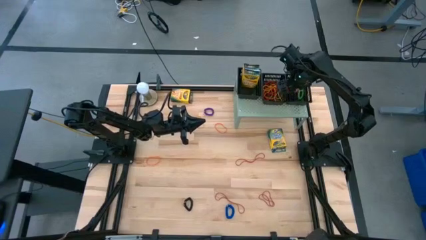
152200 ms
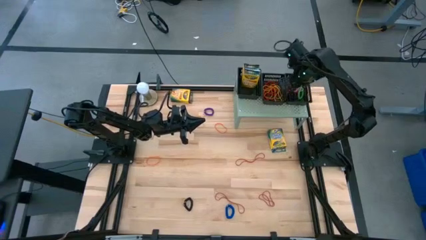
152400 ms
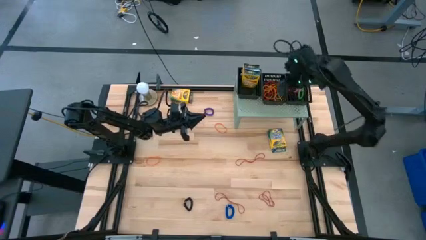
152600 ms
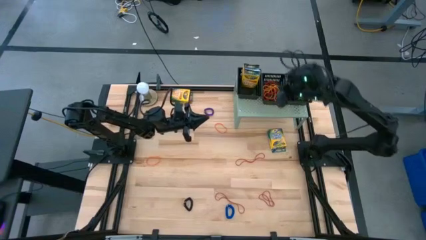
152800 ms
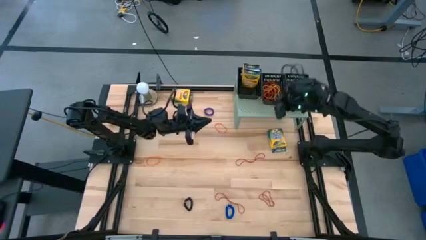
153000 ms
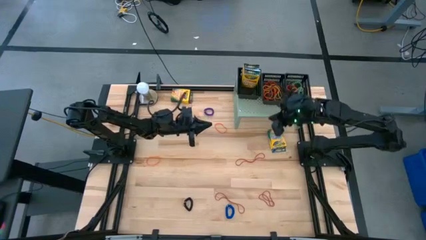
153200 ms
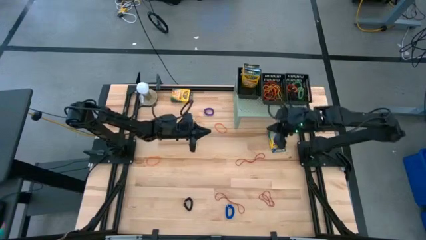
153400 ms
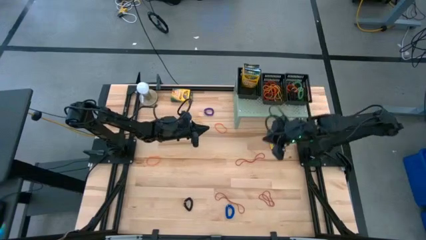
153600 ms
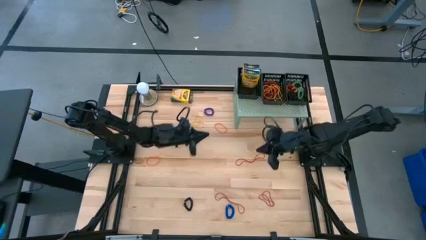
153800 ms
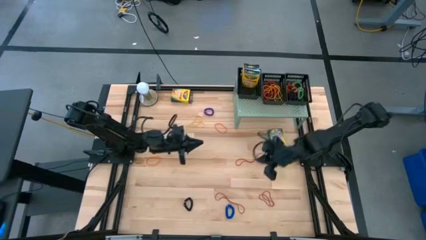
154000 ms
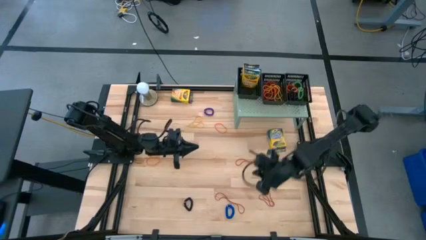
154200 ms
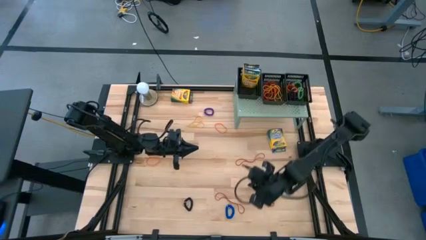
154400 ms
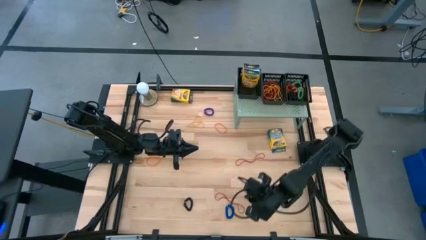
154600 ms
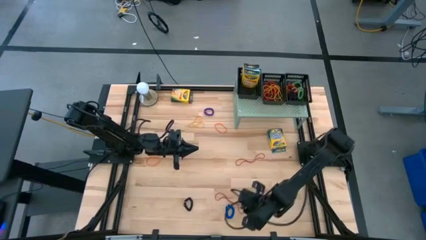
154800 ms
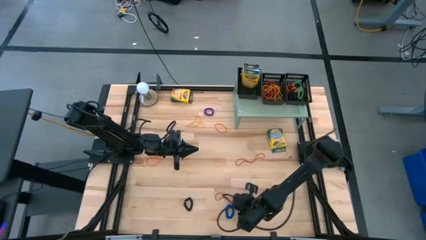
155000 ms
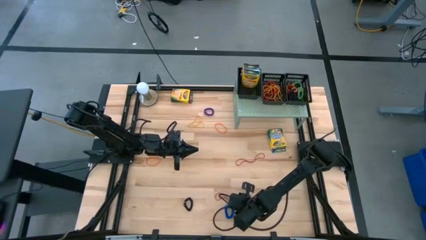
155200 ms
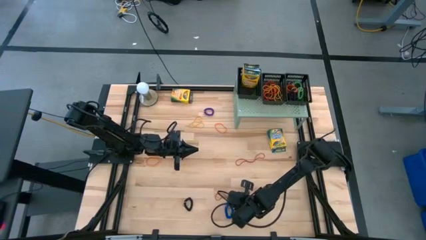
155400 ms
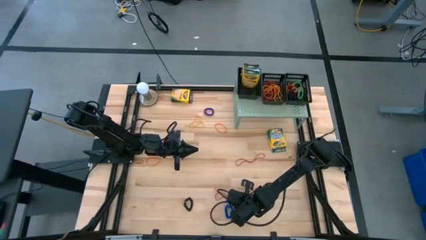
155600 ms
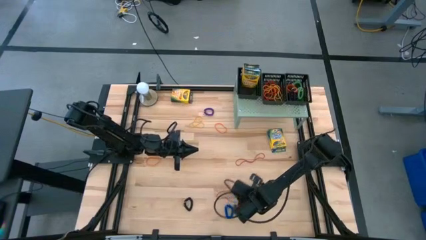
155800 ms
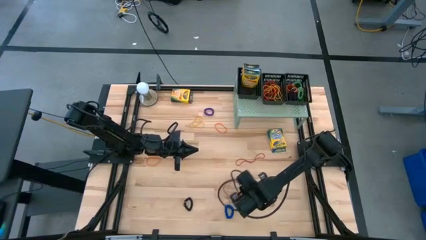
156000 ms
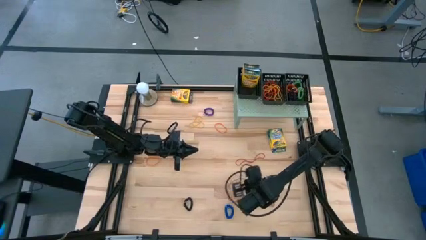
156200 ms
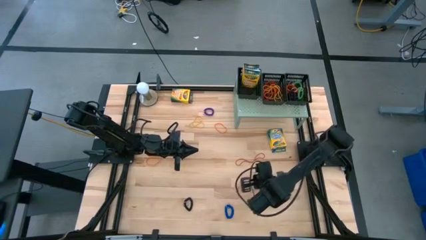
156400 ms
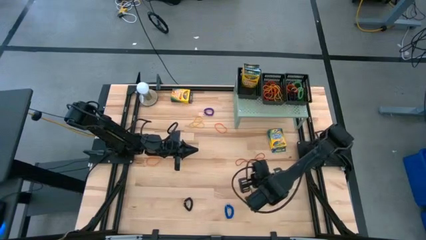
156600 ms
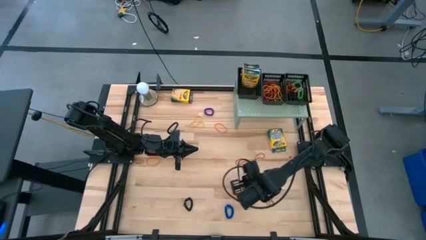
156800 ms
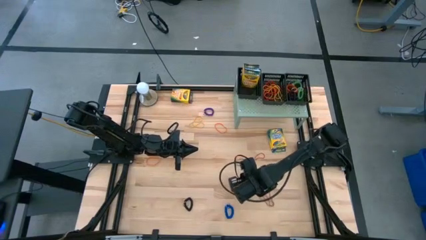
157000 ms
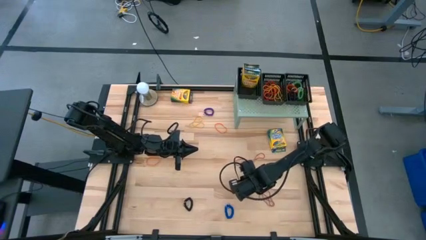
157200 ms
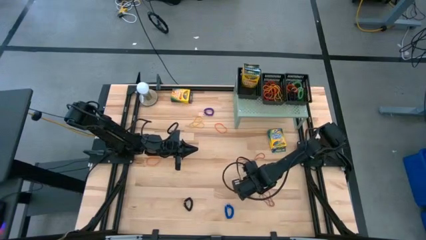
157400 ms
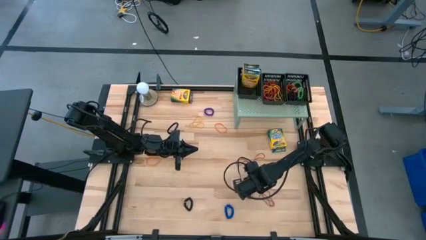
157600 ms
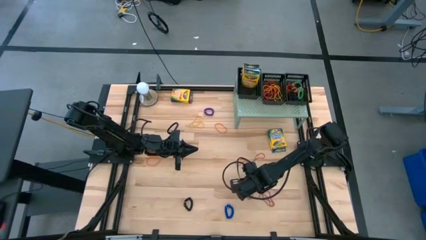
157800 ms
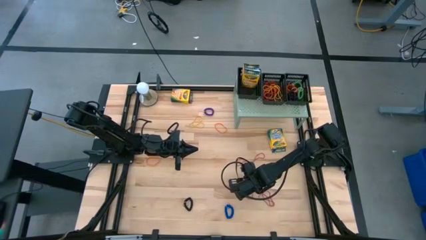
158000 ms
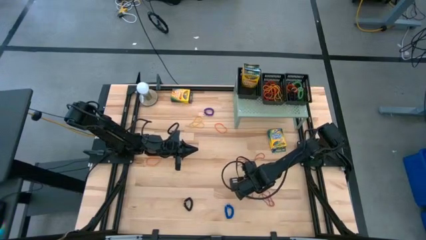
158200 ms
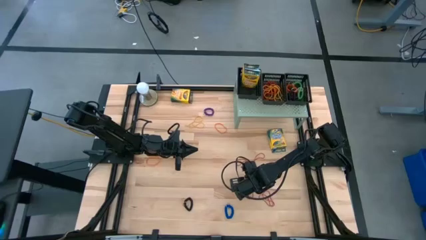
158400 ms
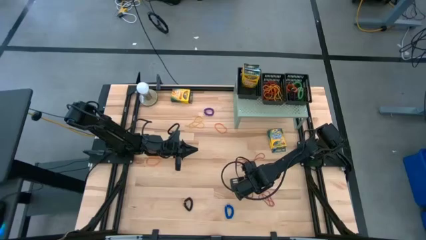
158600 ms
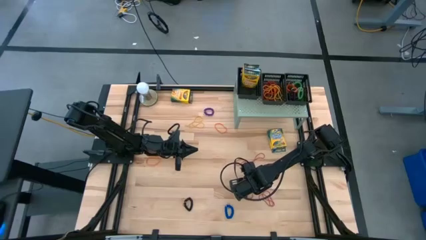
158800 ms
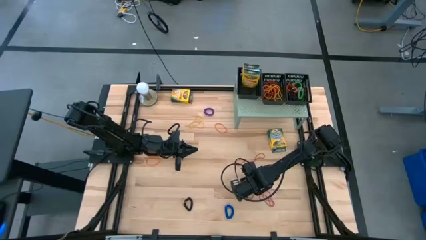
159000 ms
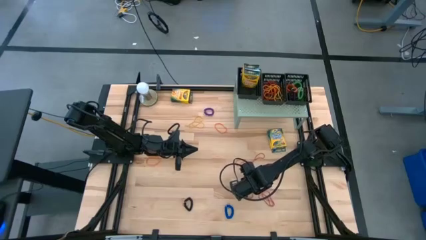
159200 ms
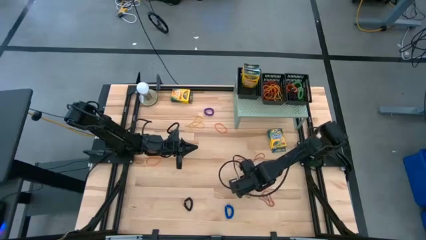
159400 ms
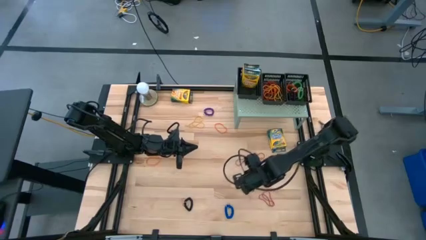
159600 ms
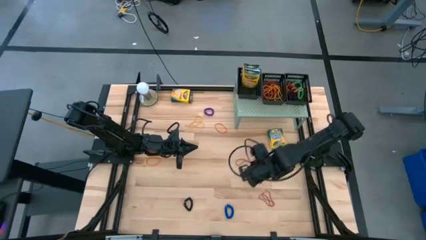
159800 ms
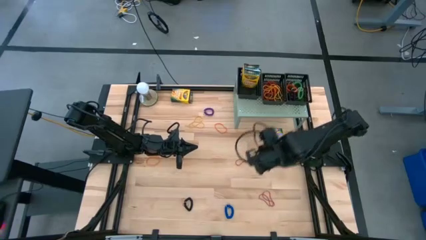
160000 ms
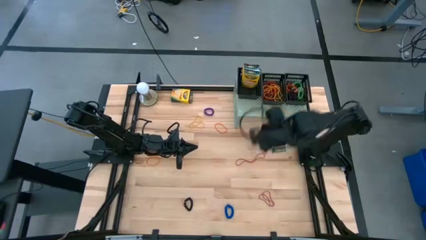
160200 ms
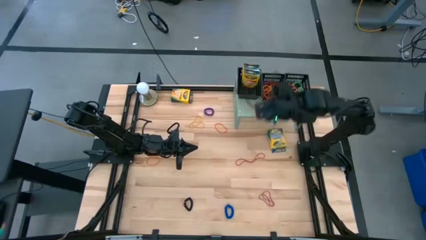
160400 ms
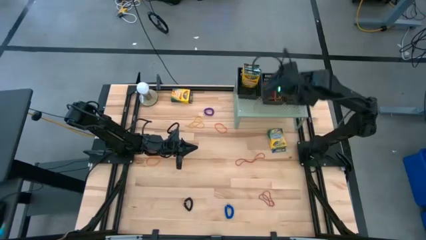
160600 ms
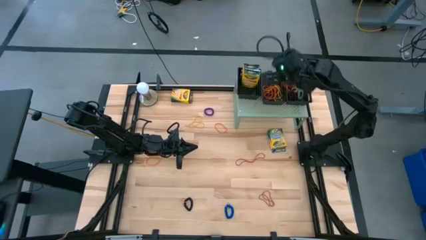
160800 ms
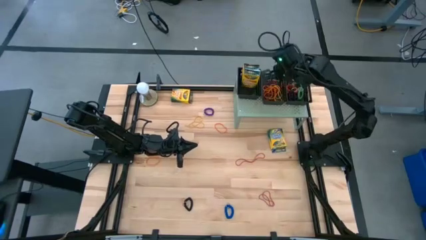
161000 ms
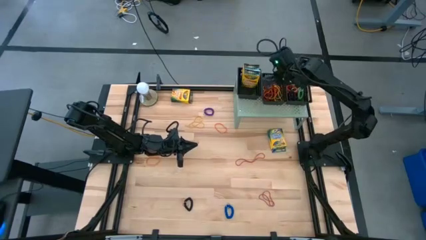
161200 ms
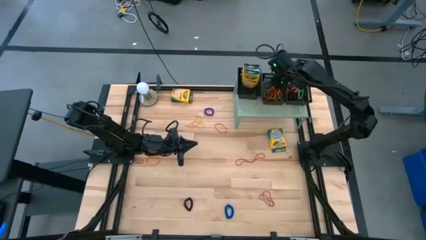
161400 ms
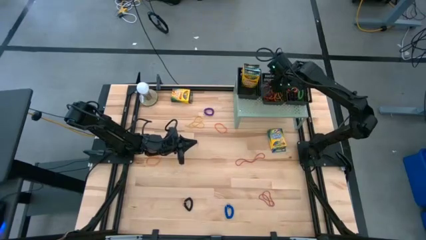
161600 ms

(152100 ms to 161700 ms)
Task: Pick & Place Office Desk Supplies
Put the bottom left red rubber band into the middle black basket on the shelf

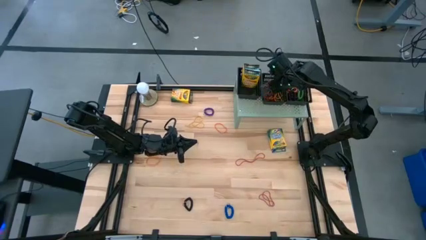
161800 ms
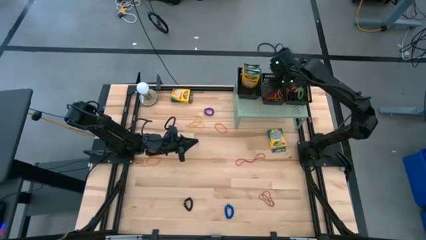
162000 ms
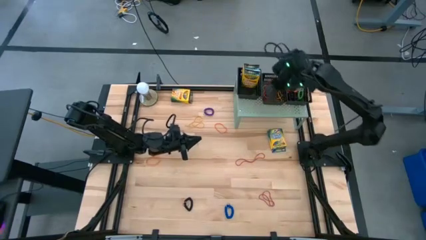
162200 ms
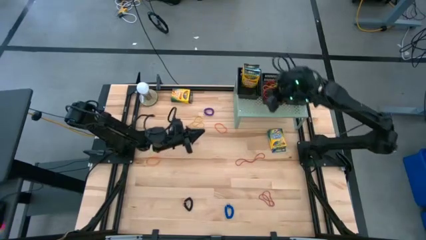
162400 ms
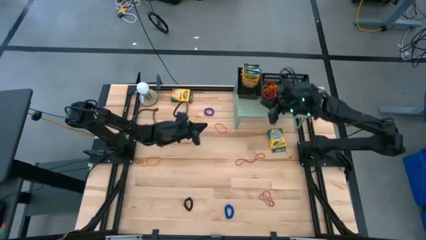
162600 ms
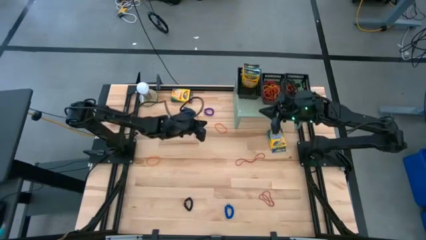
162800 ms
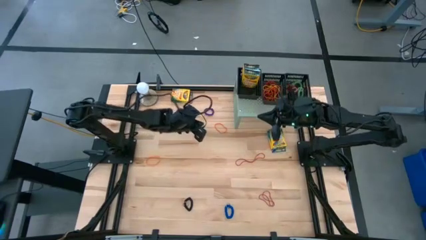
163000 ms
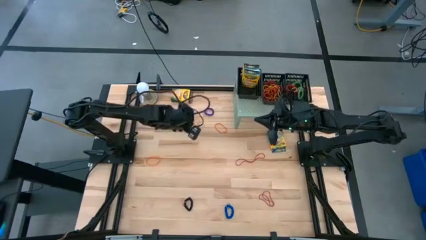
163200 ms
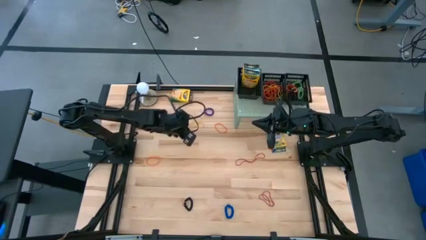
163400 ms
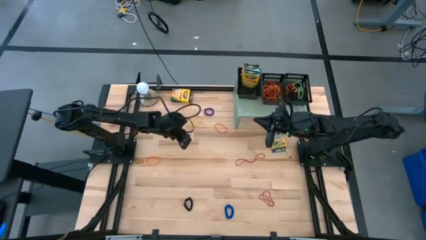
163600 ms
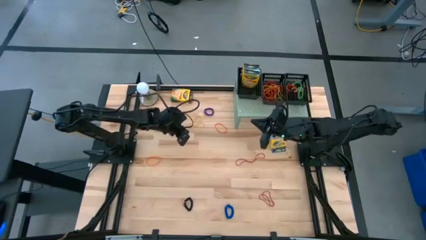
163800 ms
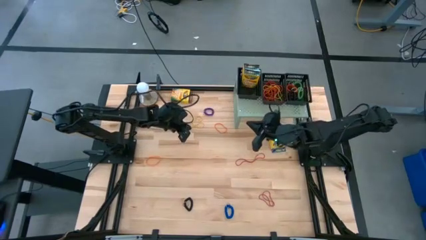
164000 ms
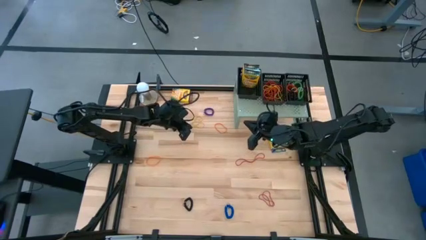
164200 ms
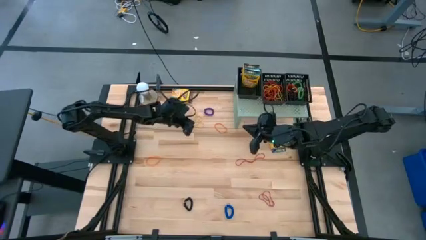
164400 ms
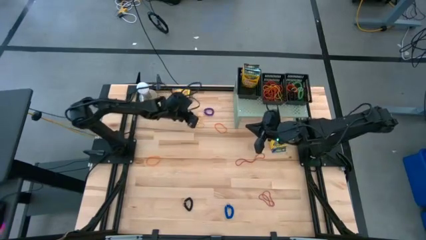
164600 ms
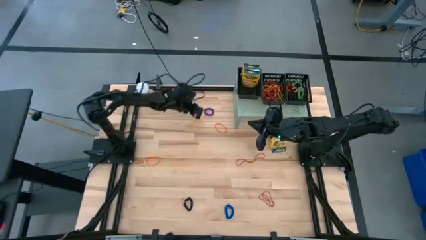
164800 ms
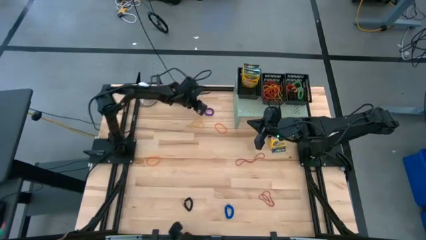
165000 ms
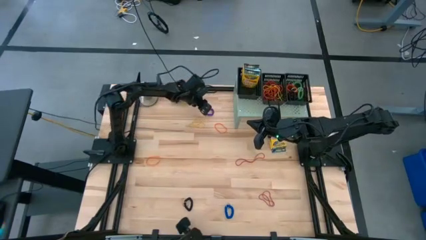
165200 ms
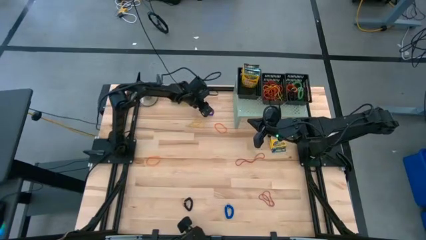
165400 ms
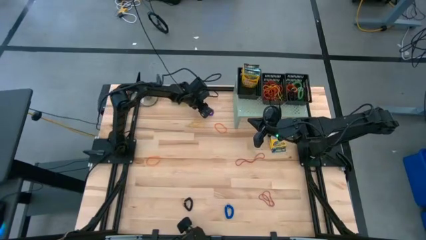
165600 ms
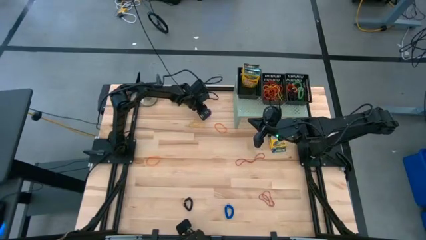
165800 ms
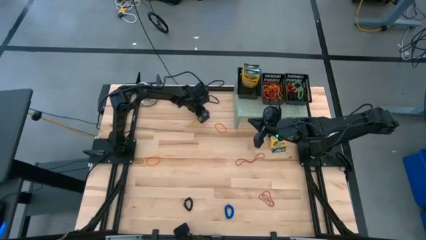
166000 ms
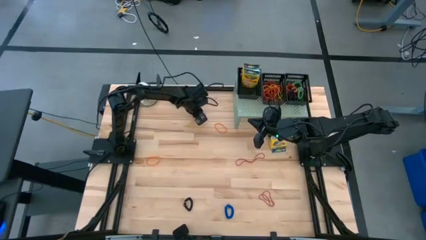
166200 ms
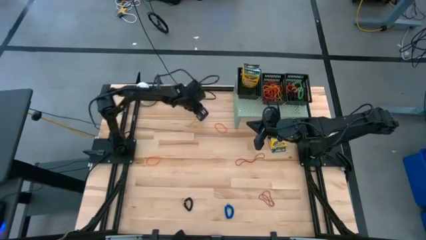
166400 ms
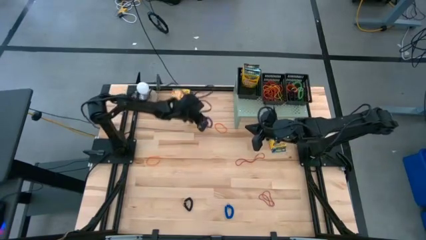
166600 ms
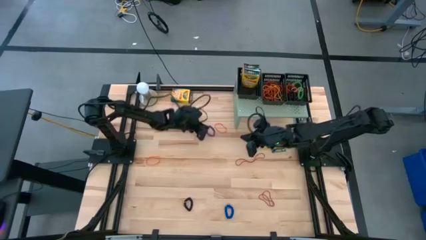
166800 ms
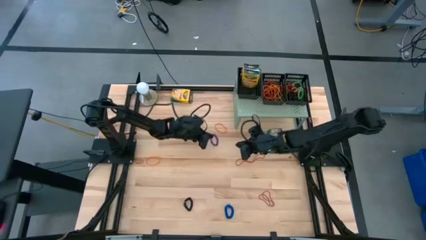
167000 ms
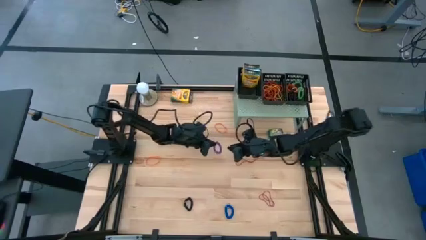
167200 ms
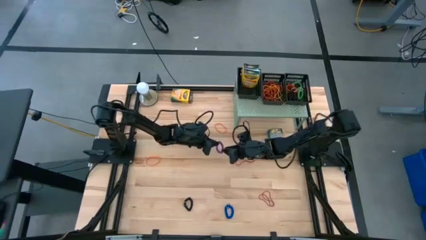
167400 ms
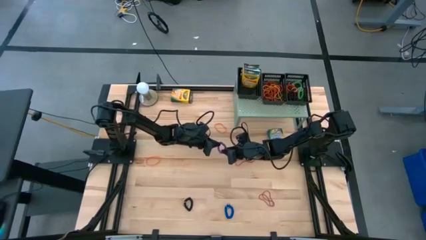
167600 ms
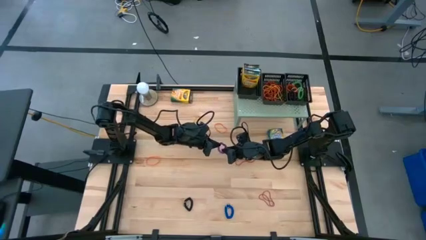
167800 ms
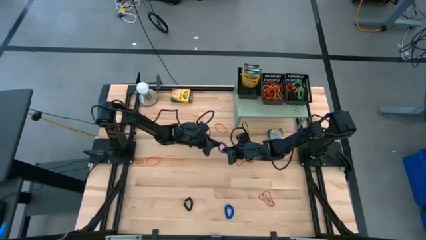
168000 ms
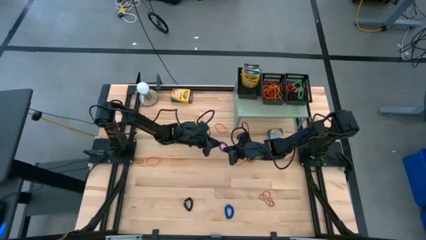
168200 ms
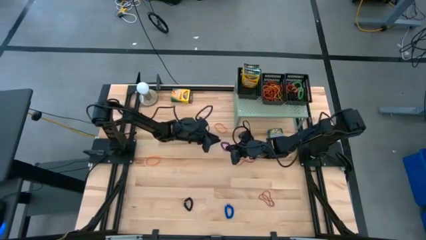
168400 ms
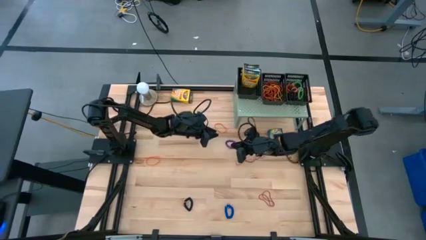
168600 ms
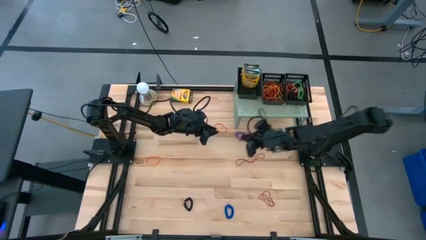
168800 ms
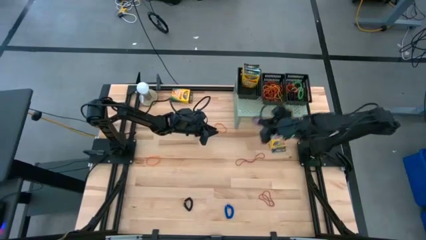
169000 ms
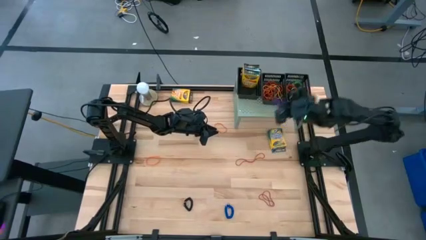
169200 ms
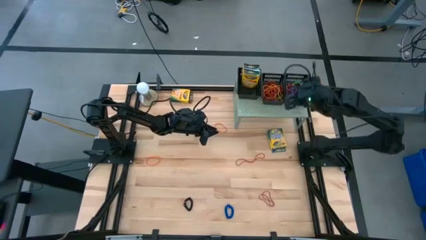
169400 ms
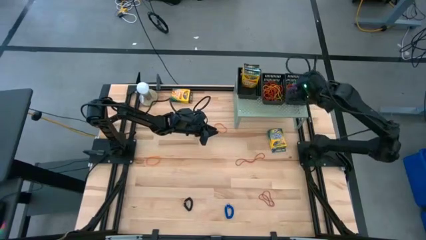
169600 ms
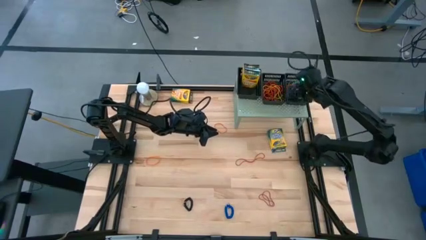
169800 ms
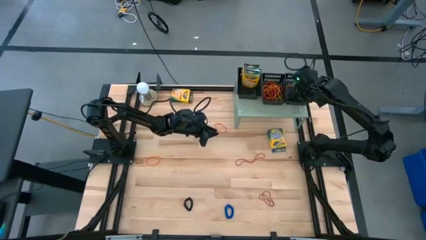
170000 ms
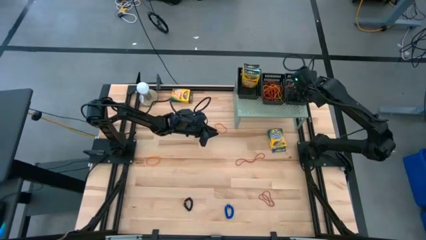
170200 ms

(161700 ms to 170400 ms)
Put the violet spring keychain into the right black basket on the shelf
